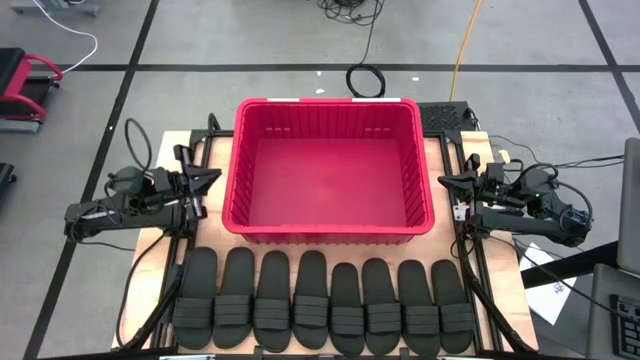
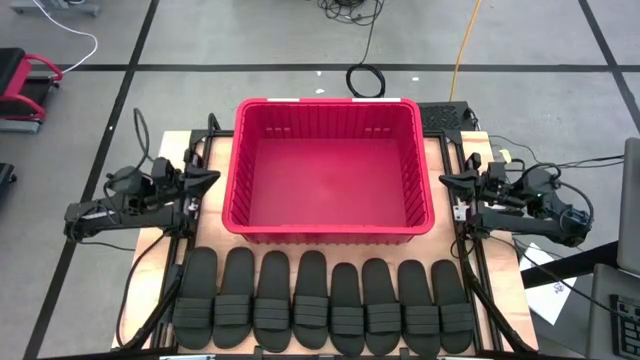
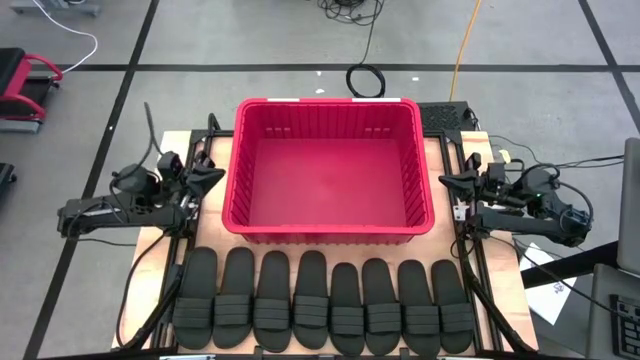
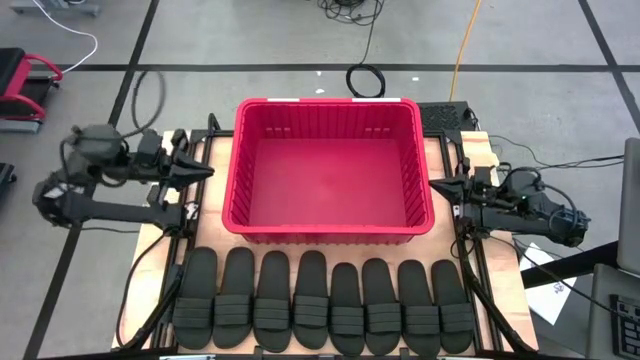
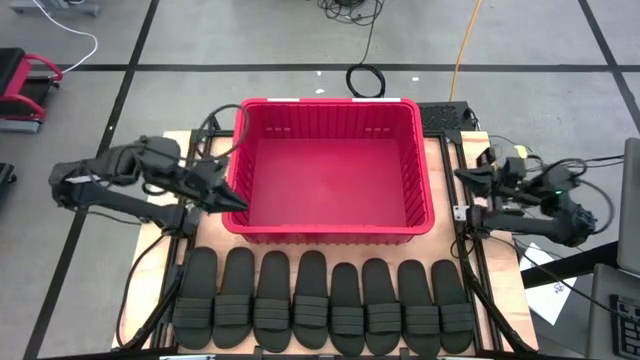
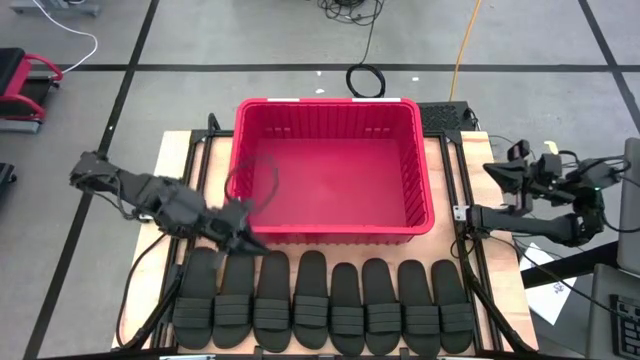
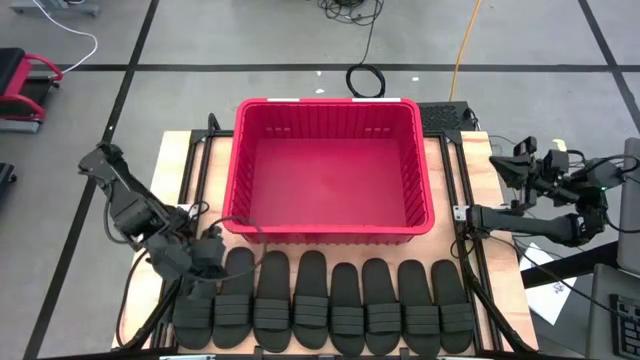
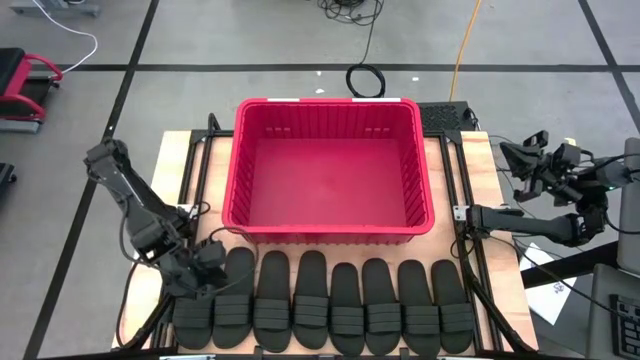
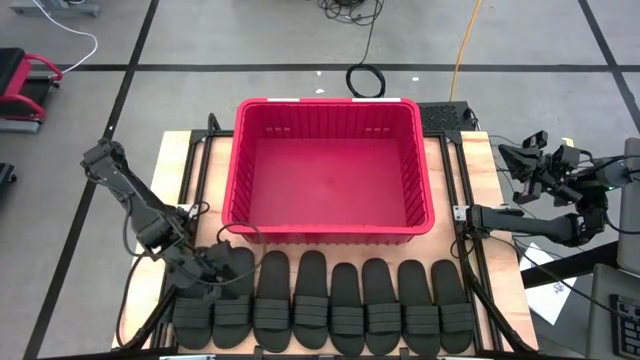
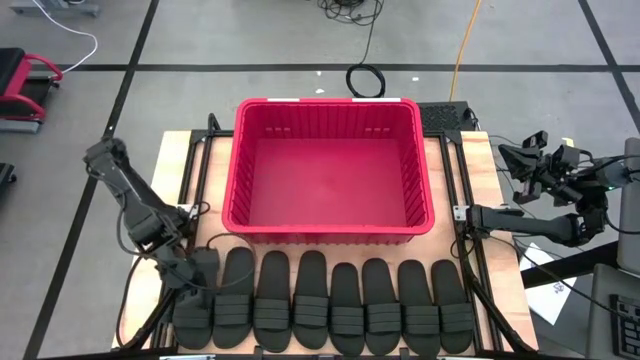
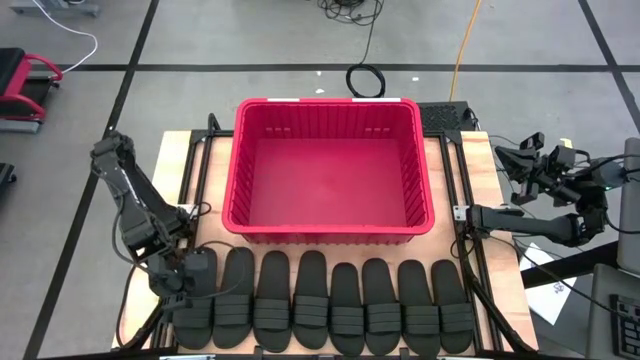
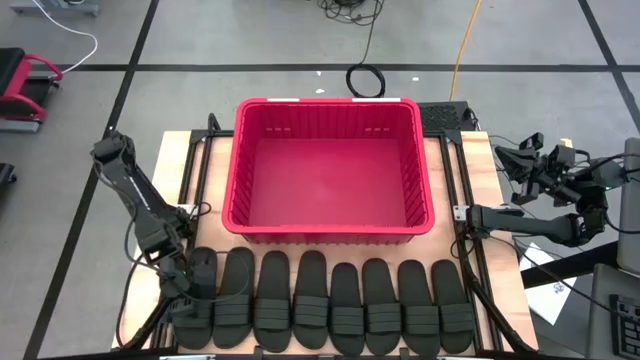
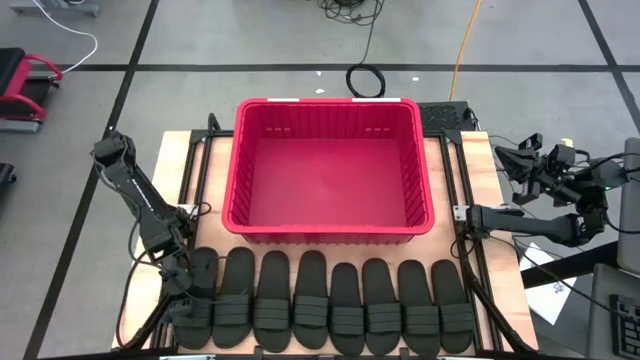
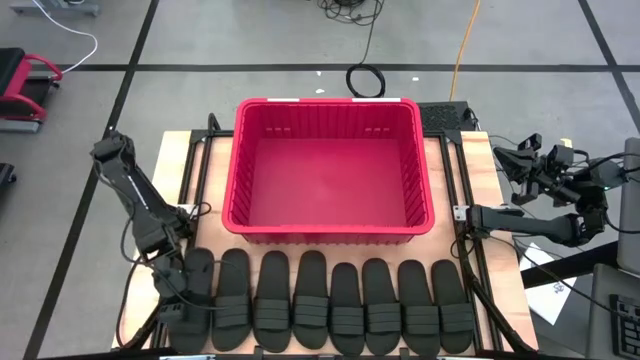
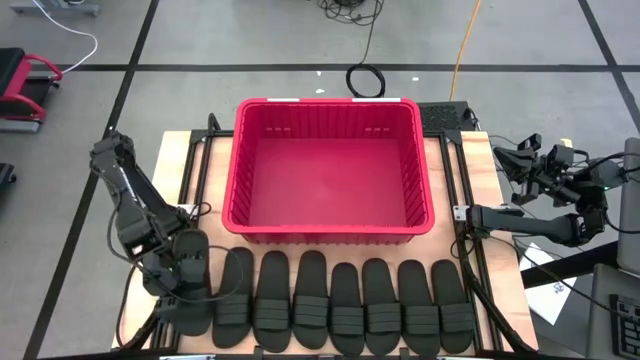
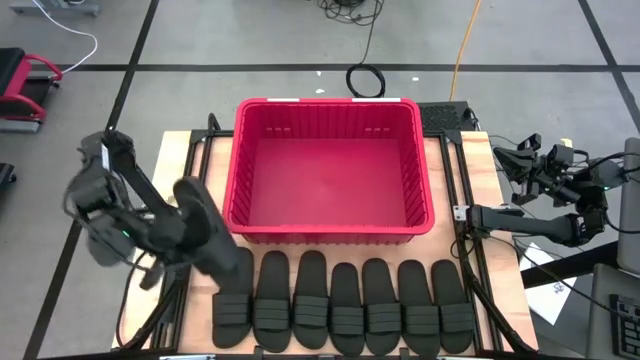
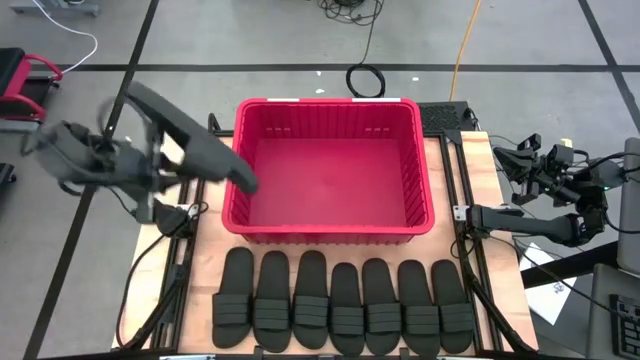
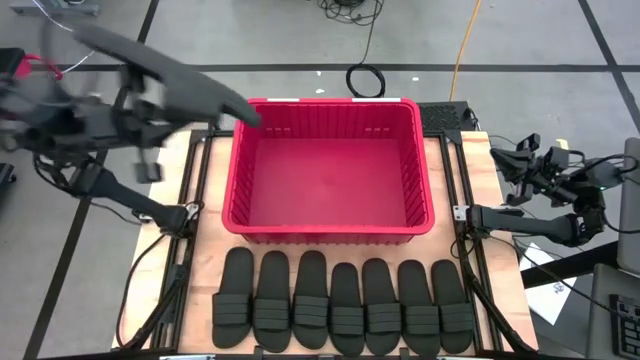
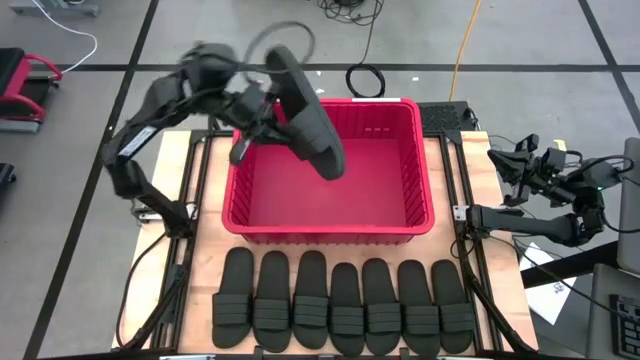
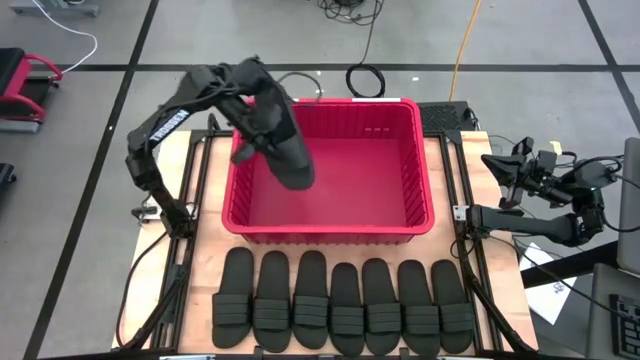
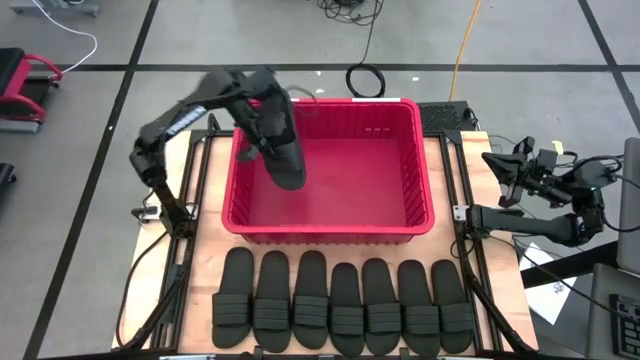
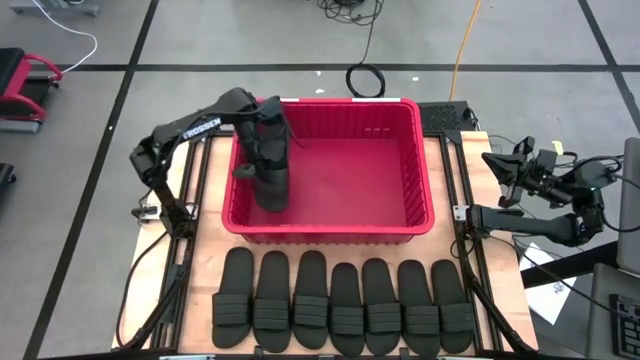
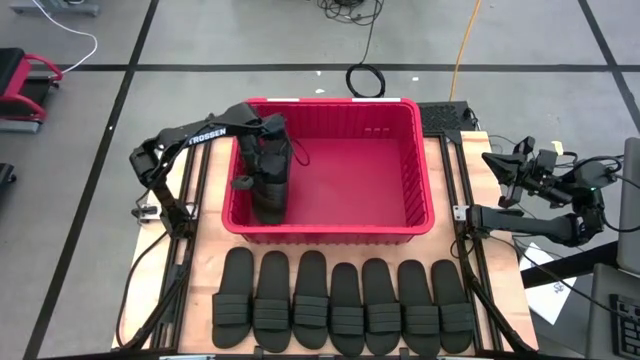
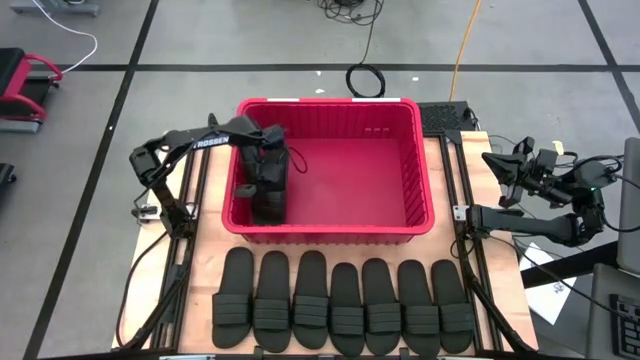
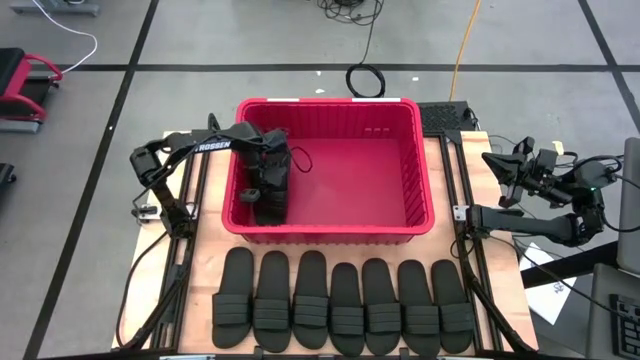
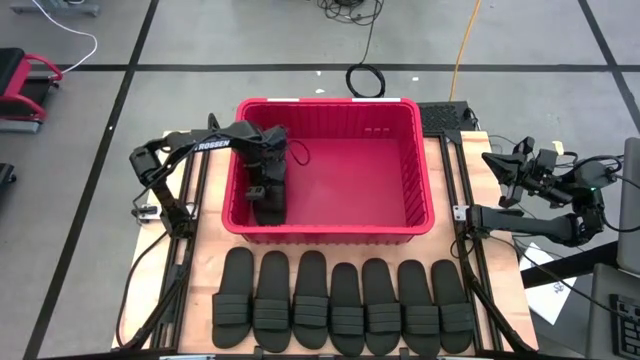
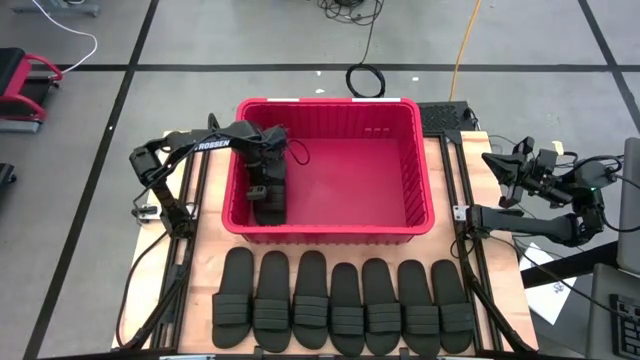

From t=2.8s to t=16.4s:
Task: Pick and place slides into bin
Put the black slide into the red bin

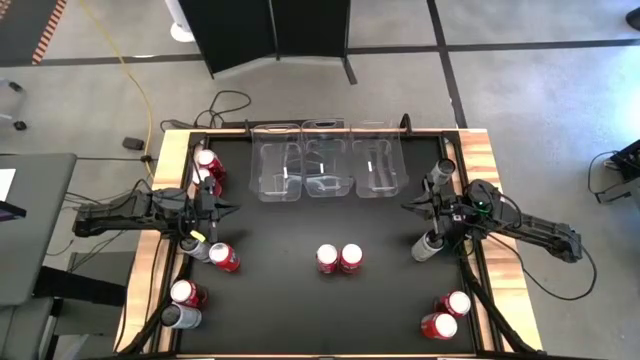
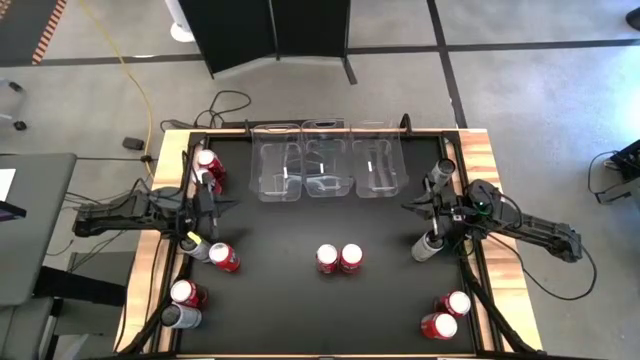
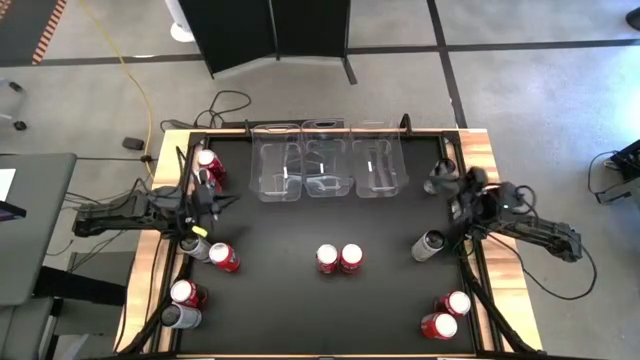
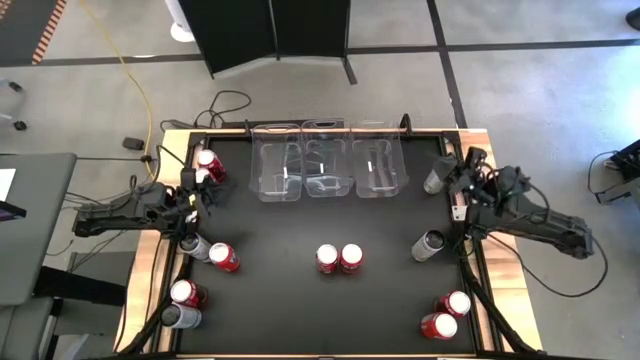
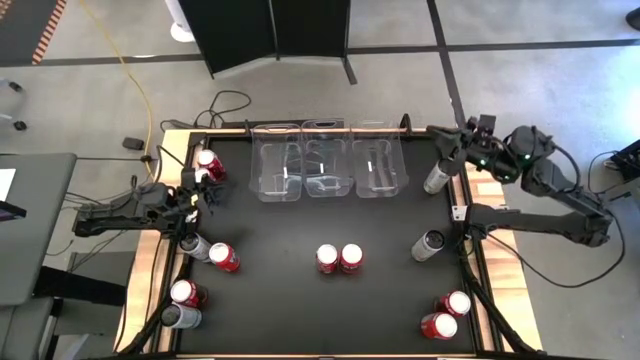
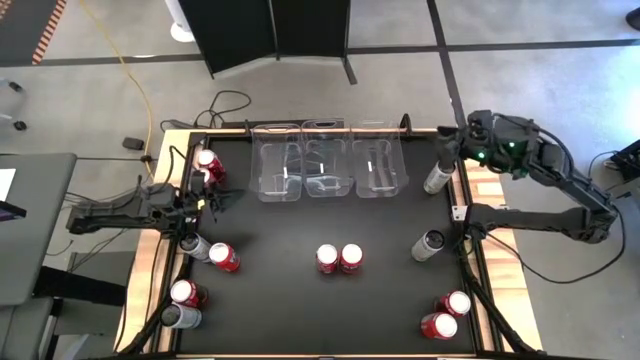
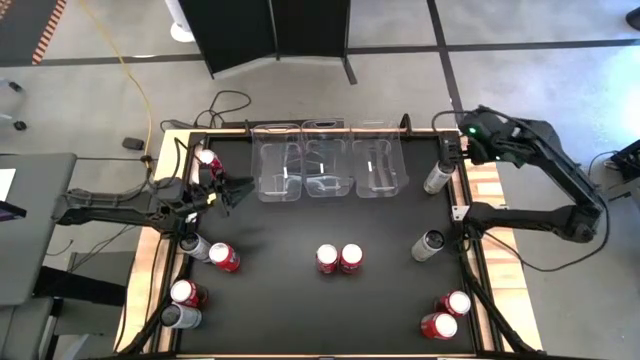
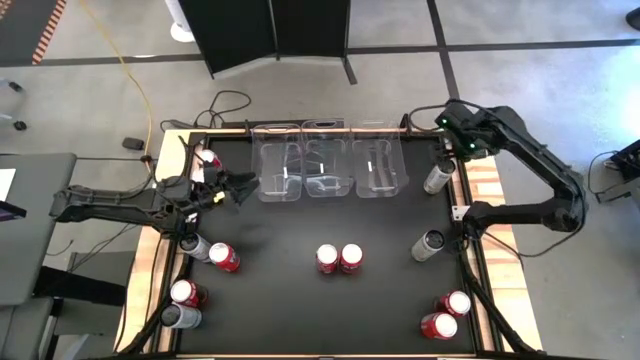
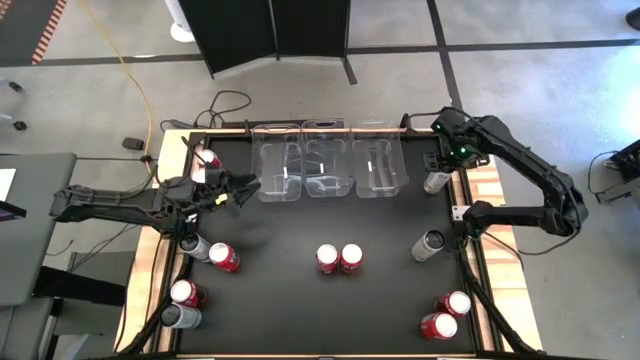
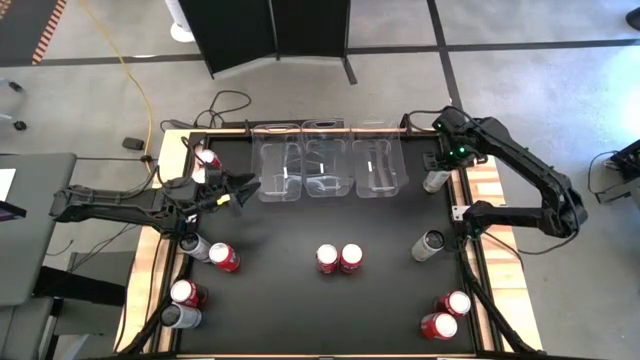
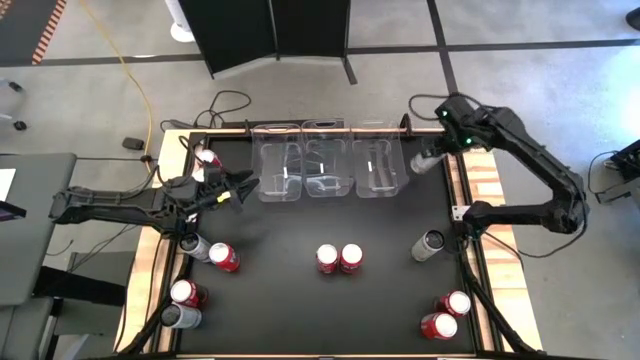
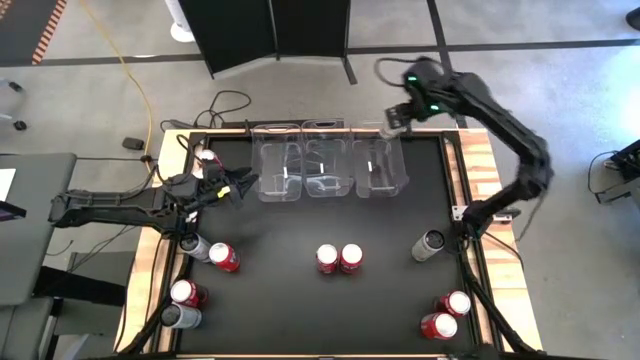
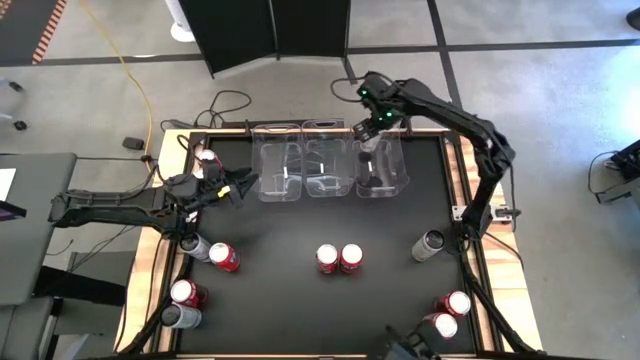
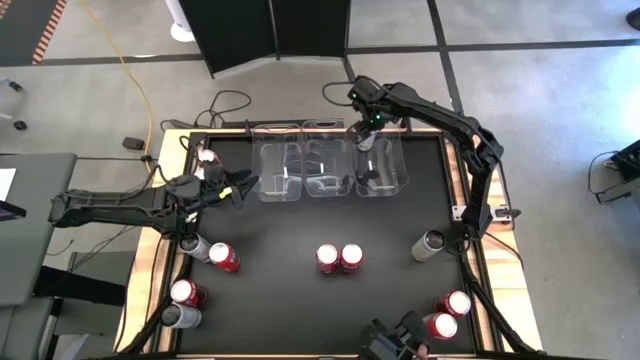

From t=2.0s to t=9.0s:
Task: Sort soda cans
Put the top white-yellow soda can into the right transparent bin
